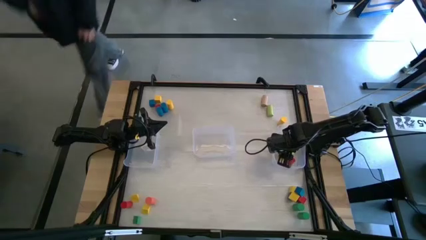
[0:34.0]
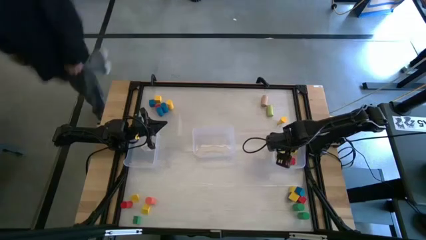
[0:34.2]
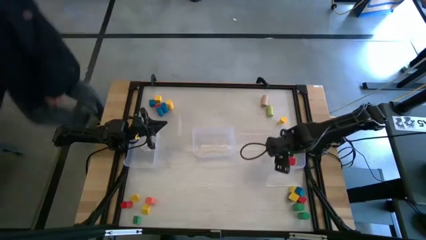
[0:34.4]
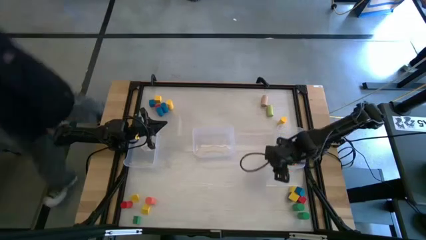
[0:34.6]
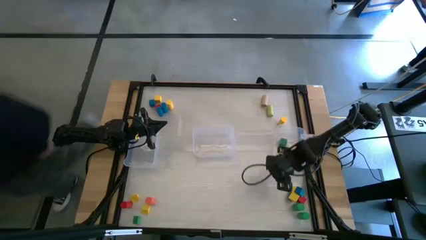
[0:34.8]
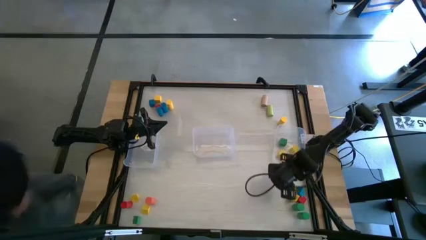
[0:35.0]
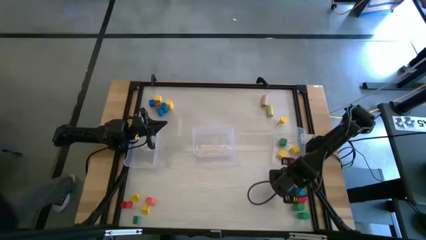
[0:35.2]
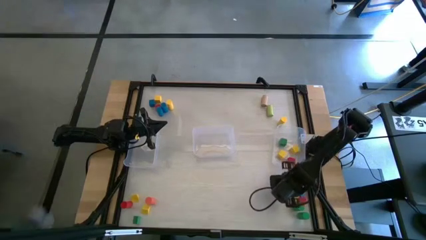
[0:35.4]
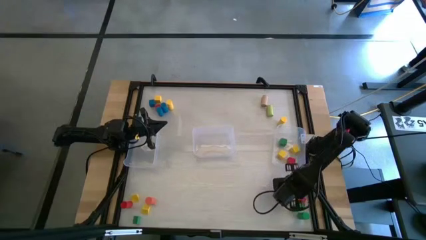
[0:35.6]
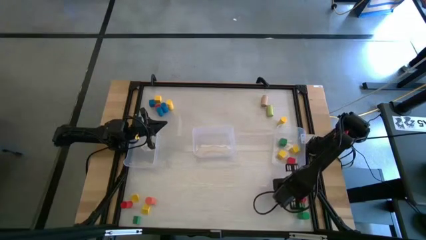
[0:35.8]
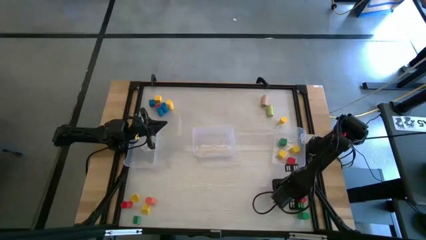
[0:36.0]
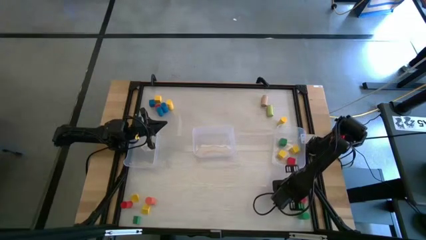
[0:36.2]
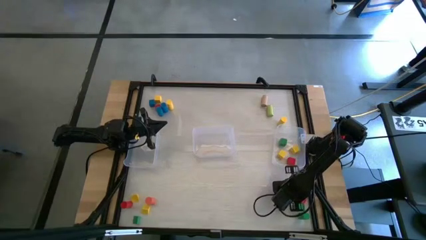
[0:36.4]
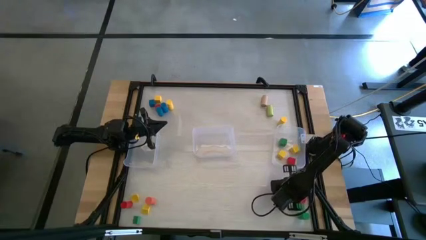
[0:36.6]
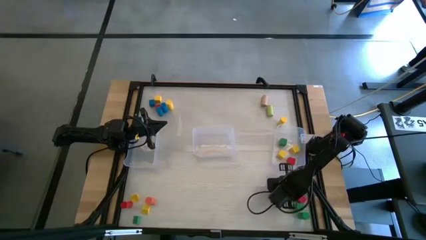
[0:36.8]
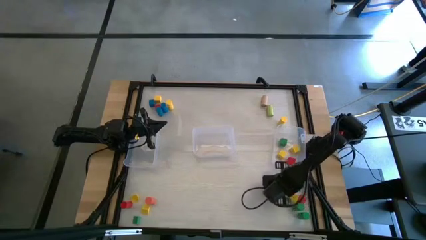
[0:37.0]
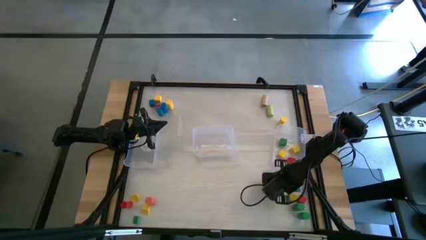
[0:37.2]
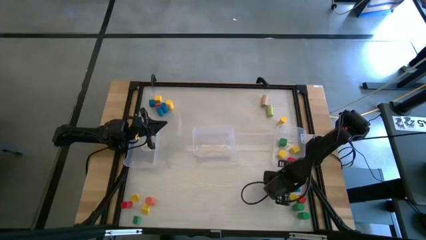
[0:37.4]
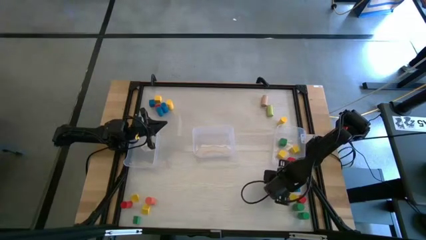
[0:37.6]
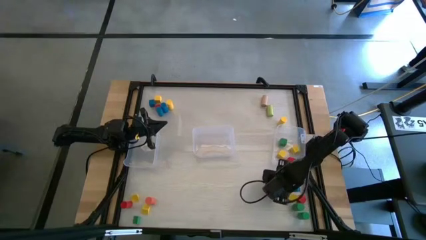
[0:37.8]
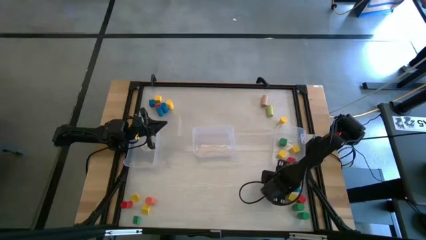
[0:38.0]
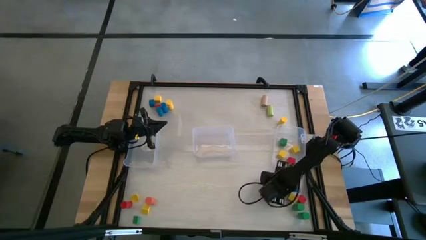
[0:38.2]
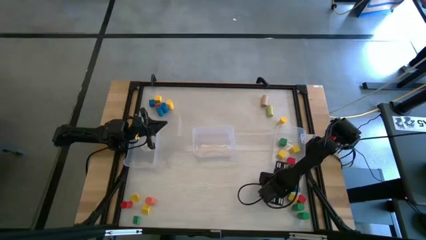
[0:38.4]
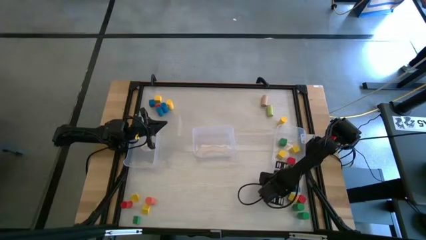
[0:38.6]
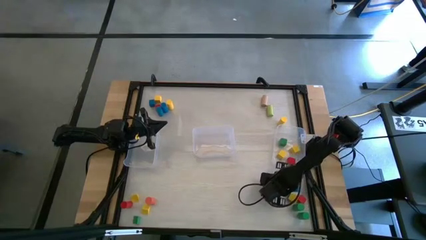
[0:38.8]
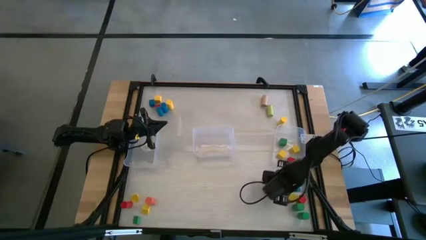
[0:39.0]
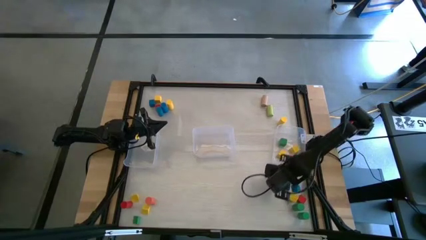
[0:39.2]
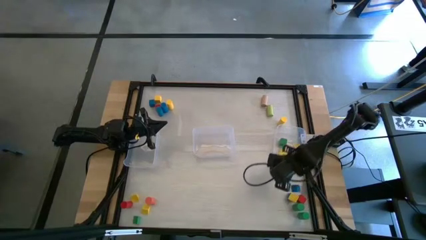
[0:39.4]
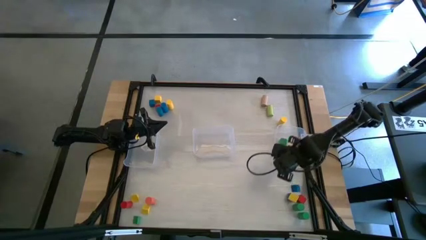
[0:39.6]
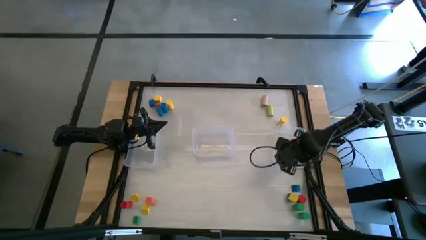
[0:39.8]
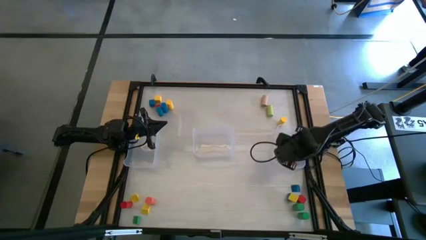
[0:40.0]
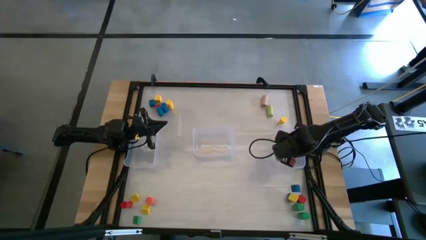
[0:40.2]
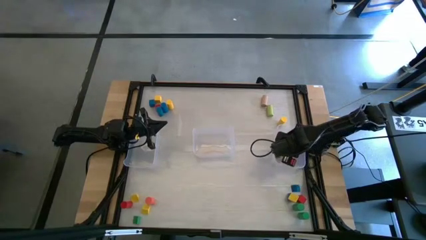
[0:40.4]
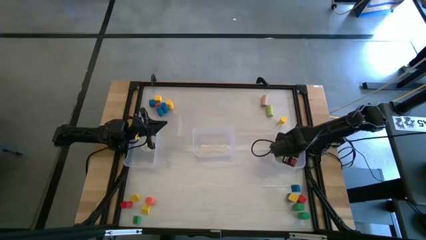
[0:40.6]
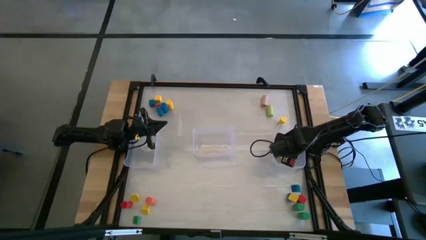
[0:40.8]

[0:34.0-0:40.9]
Task: Sort blocks by size
Put the yellow cube block into the right transparent bin

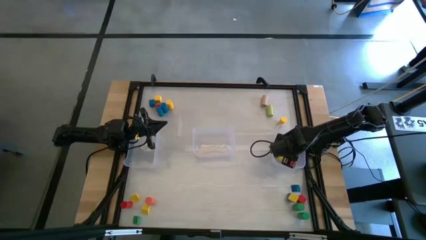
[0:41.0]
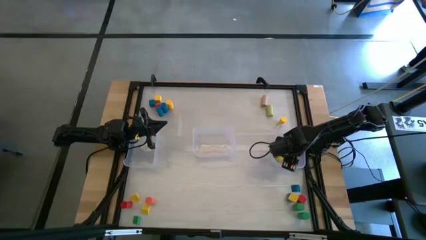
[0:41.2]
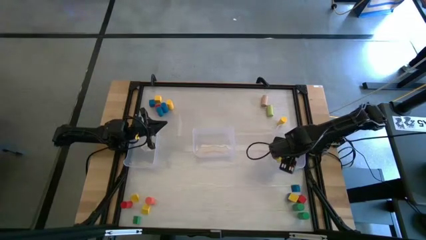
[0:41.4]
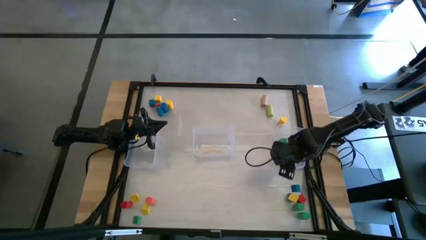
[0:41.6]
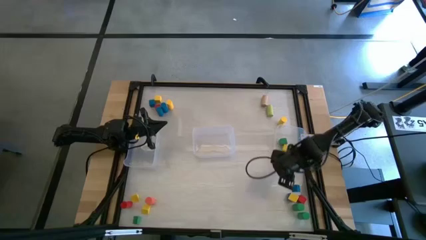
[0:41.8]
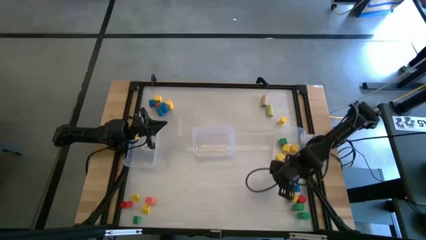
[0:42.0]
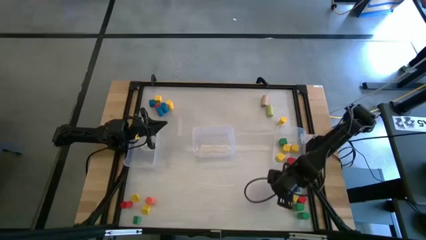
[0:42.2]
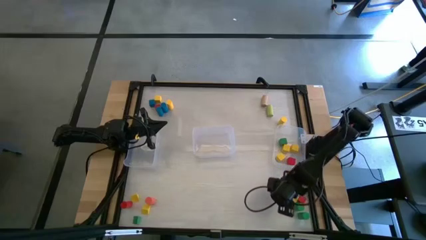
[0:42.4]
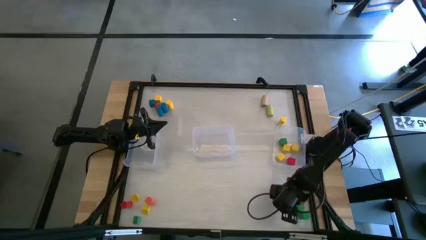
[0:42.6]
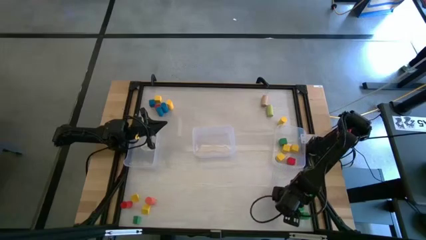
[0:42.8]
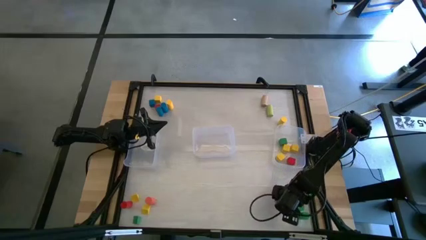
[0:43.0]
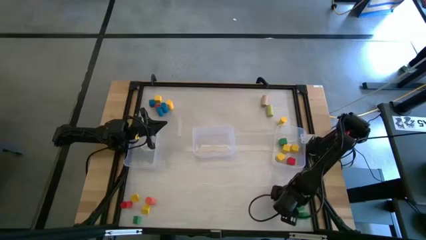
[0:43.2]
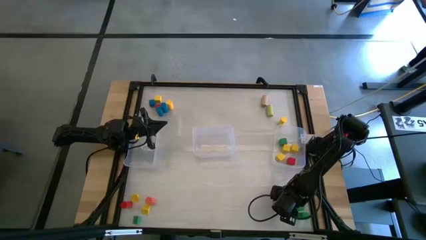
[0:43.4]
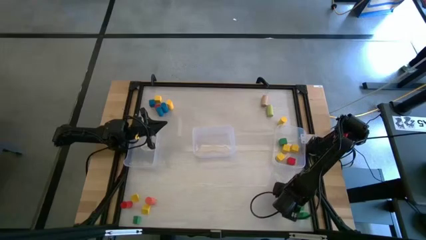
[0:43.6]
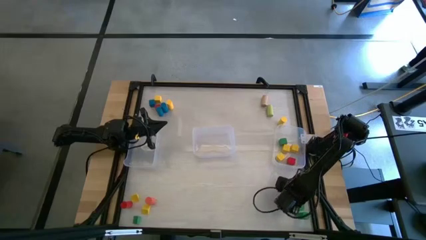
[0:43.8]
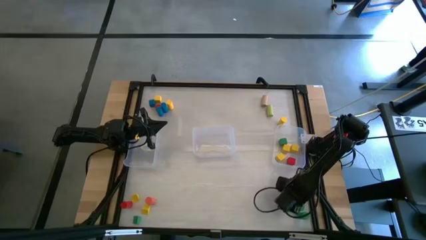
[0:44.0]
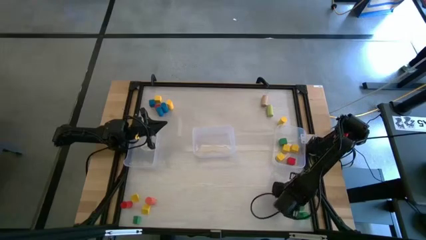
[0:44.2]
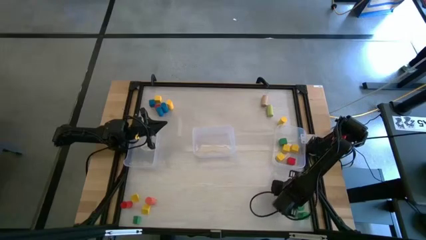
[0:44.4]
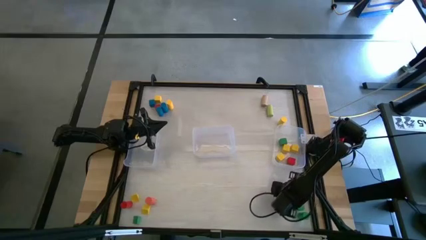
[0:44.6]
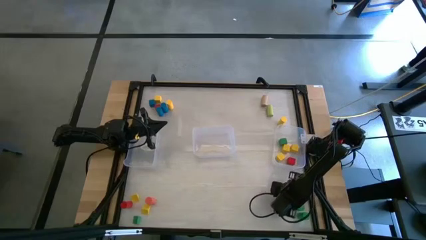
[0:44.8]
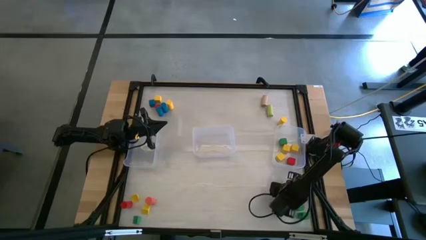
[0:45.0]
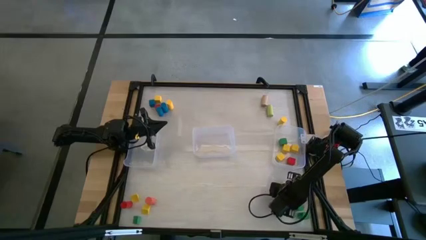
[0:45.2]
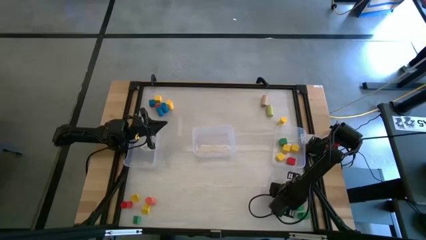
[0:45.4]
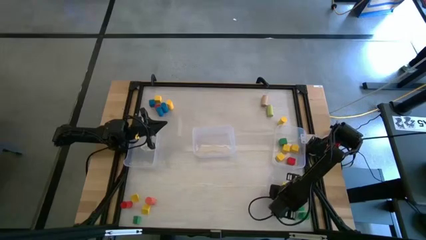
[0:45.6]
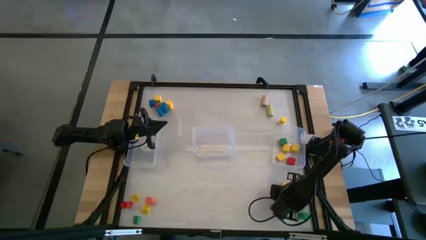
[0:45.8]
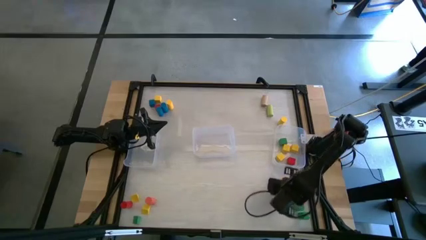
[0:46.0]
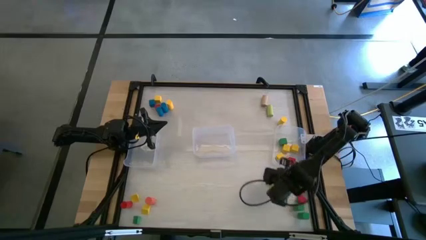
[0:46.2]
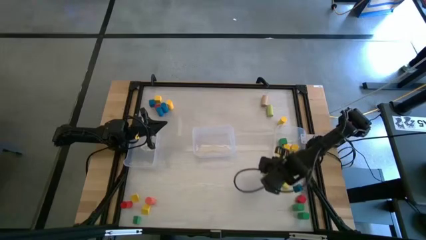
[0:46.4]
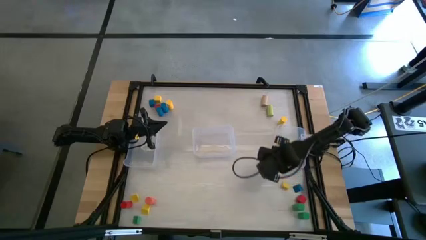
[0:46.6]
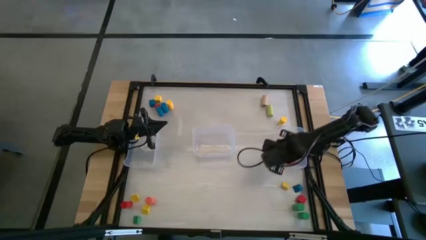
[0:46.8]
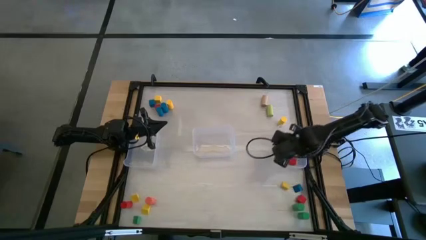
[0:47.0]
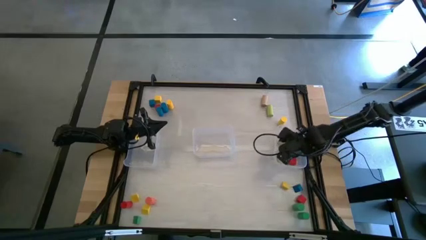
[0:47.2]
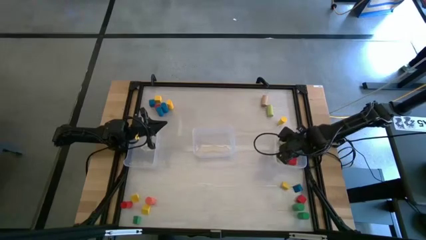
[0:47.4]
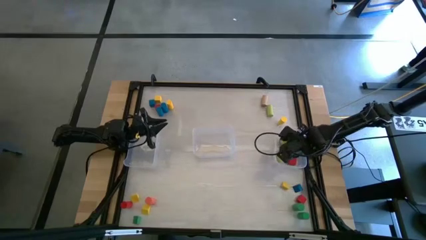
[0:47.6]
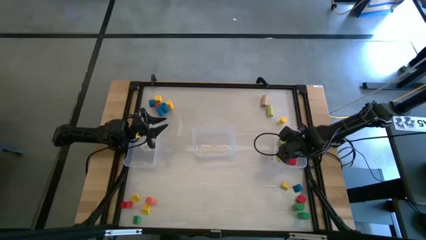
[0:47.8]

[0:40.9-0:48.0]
Put the blue cube block into the right transparent bin

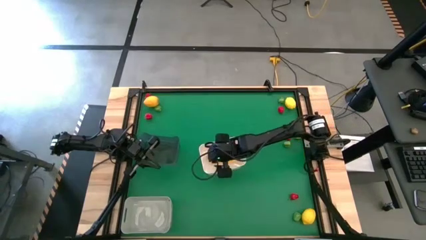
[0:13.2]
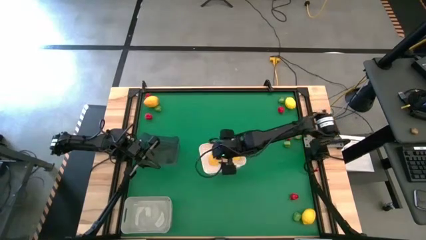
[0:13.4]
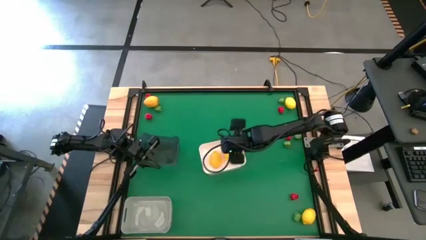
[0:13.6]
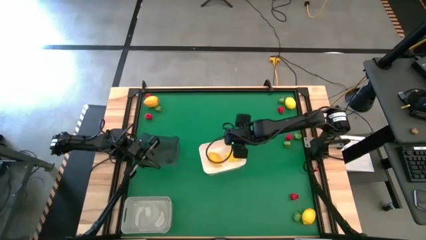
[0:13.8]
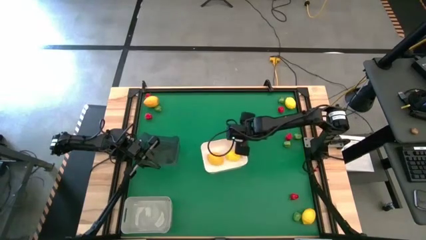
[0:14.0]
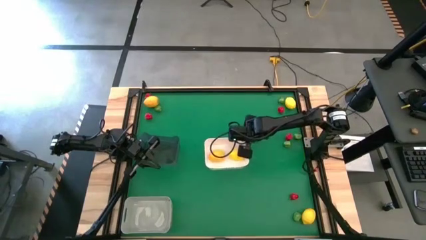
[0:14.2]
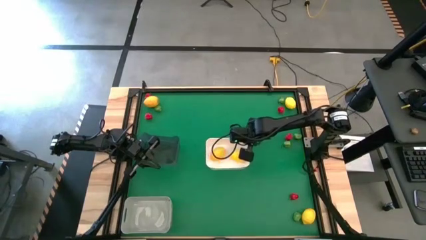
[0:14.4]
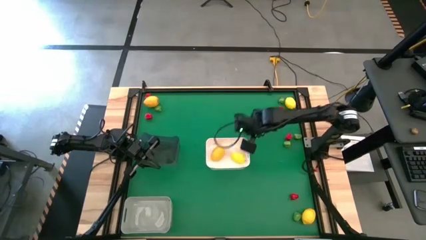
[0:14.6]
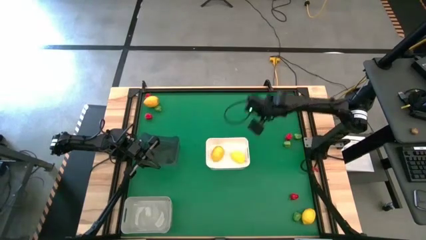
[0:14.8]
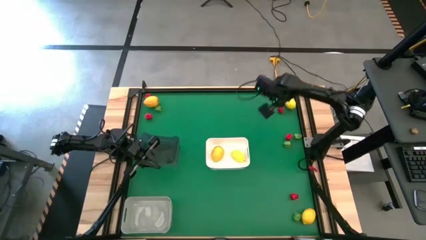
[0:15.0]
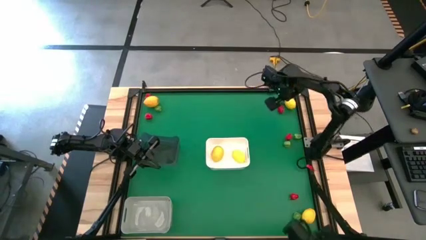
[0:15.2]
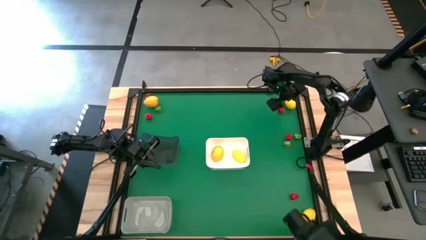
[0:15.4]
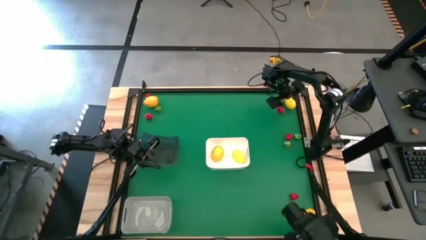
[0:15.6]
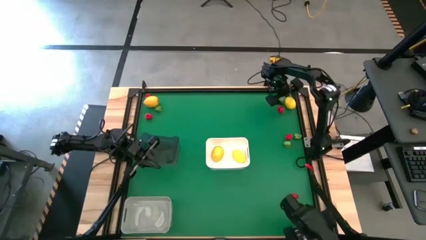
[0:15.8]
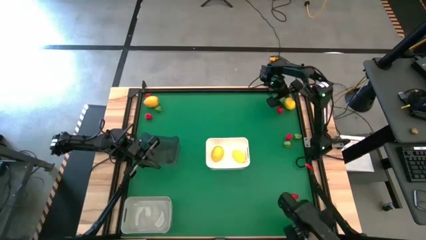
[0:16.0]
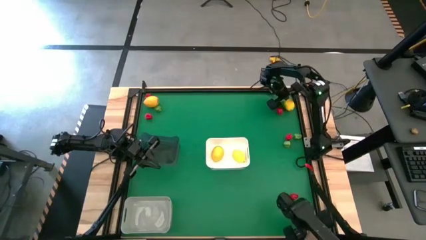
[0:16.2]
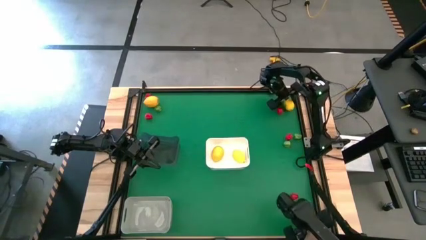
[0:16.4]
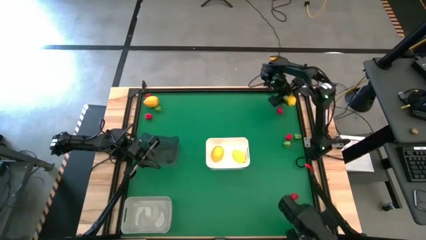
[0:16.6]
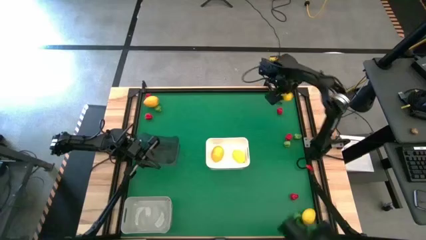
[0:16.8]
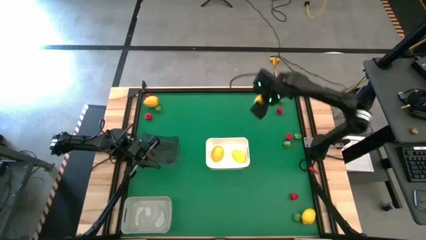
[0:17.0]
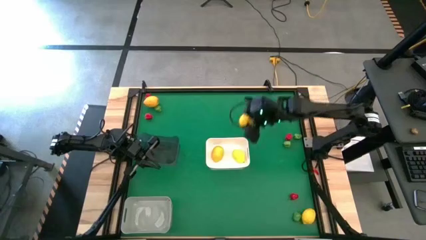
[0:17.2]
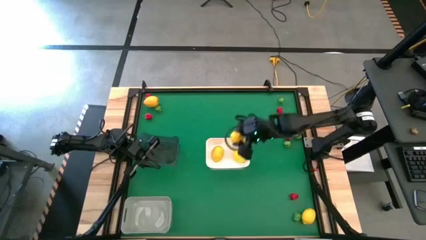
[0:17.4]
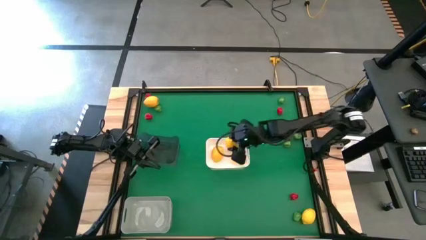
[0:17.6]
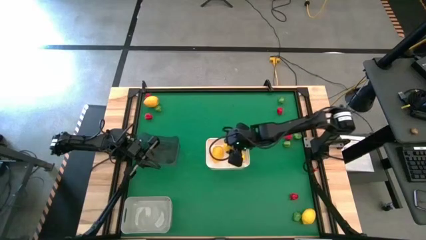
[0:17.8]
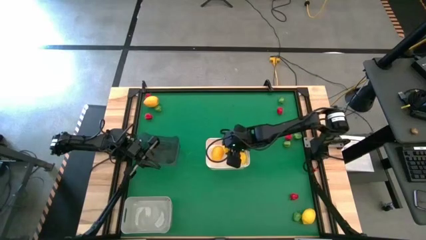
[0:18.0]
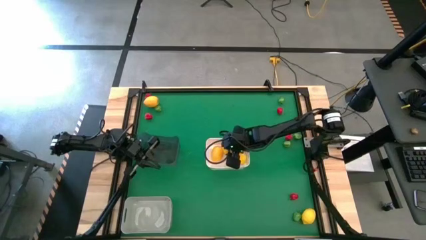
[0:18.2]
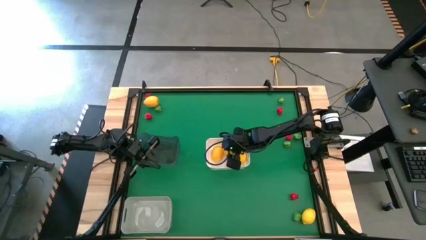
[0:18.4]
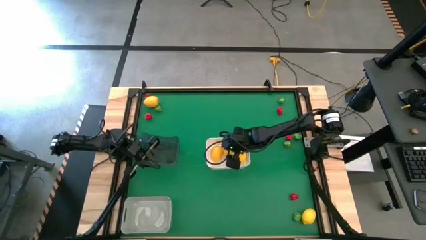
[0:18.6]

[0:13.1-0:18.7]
Task: Sort produce into baskets
Put the yellow lemon into the white bin
